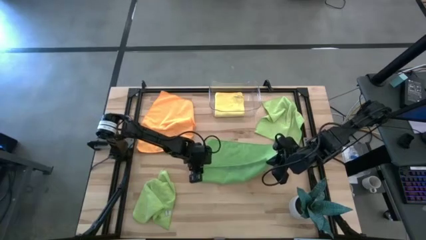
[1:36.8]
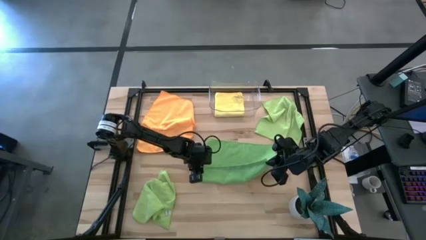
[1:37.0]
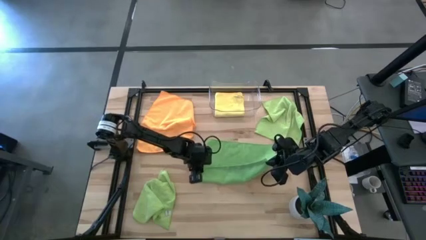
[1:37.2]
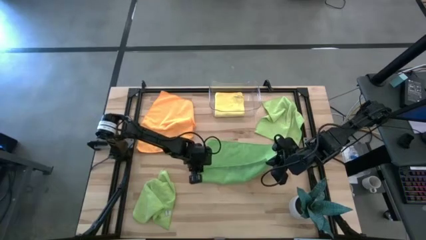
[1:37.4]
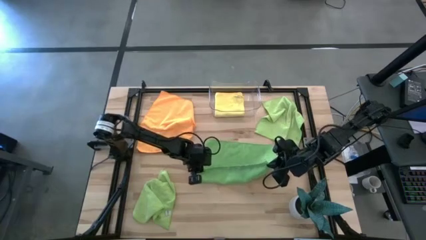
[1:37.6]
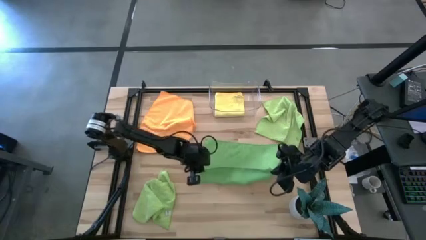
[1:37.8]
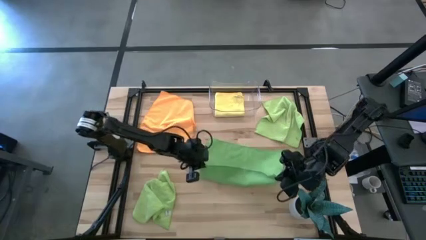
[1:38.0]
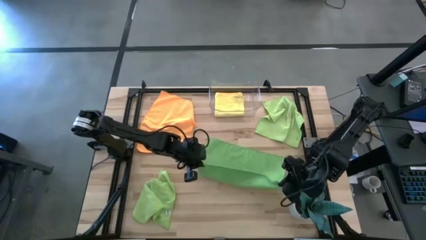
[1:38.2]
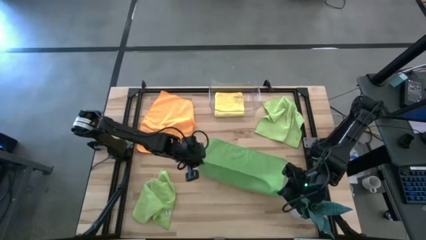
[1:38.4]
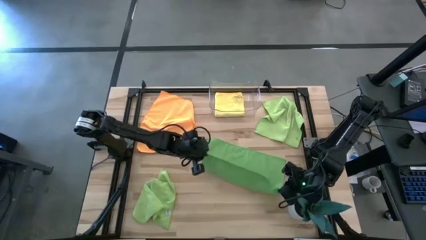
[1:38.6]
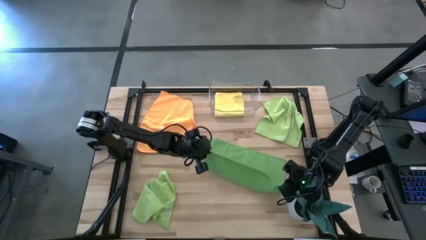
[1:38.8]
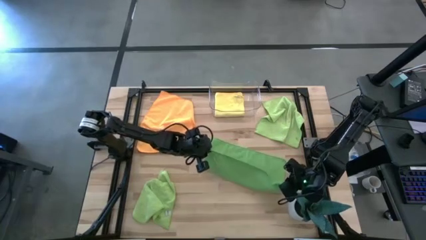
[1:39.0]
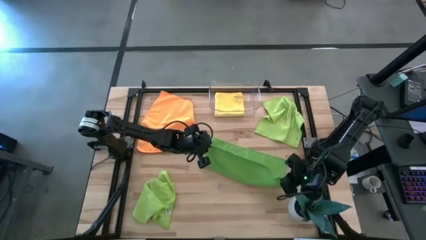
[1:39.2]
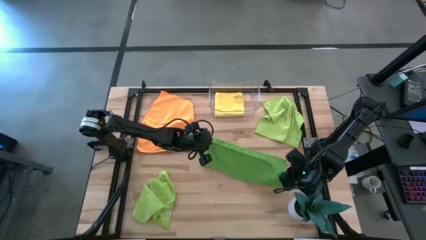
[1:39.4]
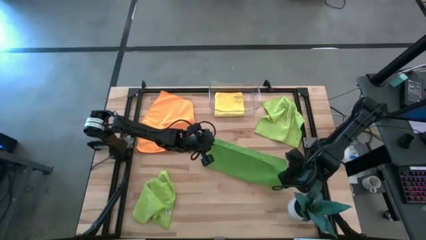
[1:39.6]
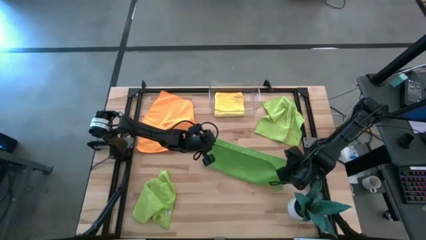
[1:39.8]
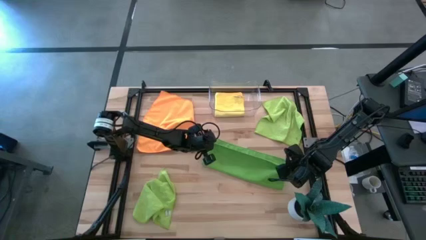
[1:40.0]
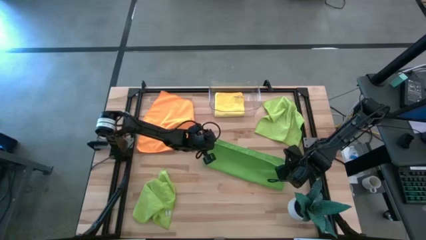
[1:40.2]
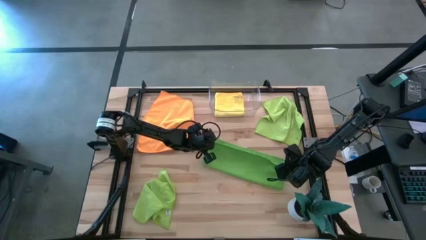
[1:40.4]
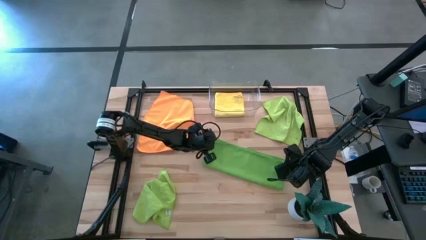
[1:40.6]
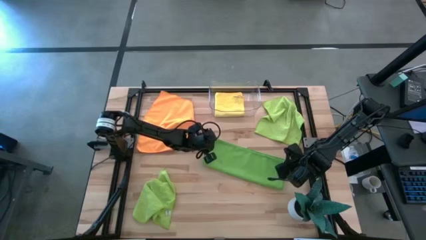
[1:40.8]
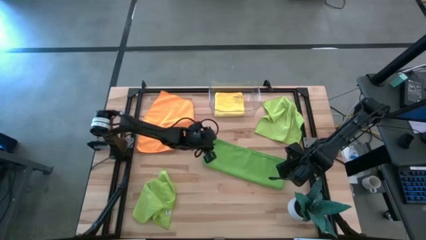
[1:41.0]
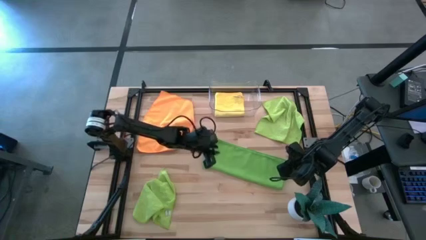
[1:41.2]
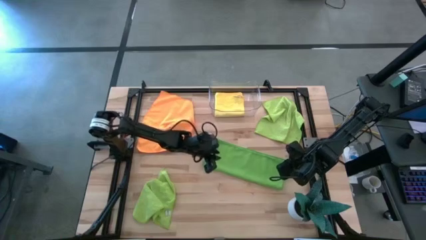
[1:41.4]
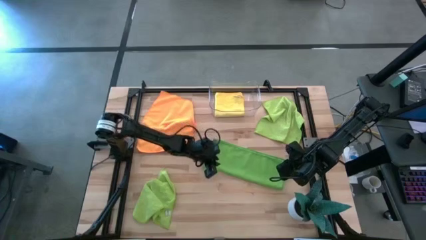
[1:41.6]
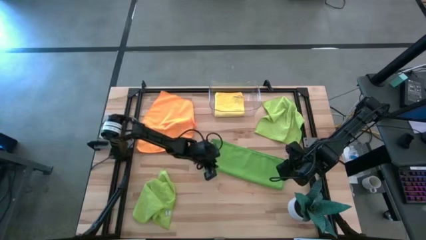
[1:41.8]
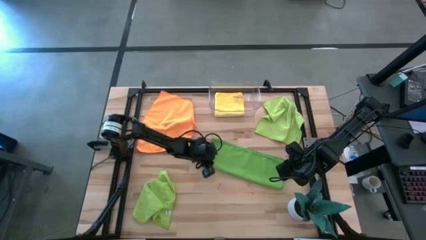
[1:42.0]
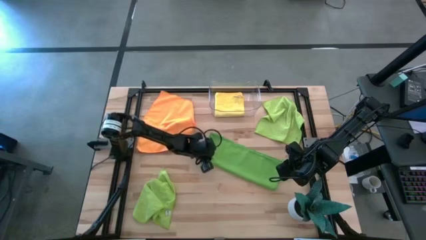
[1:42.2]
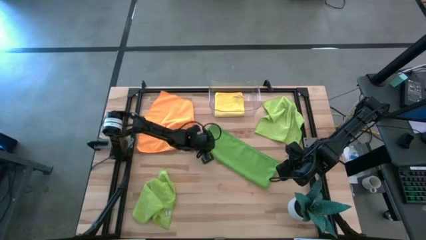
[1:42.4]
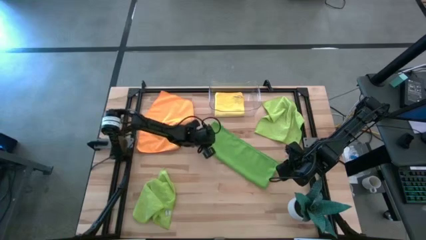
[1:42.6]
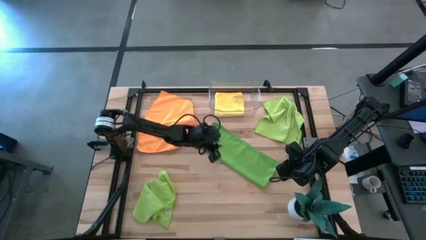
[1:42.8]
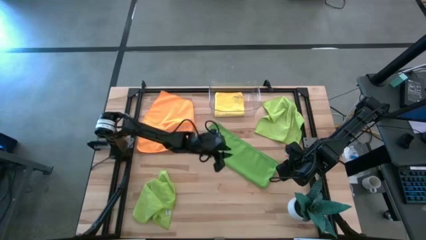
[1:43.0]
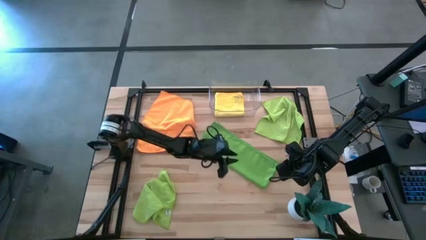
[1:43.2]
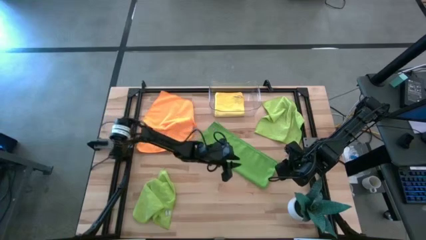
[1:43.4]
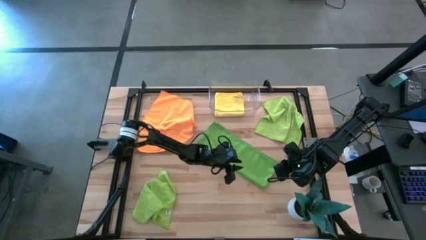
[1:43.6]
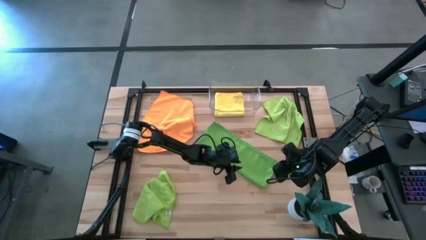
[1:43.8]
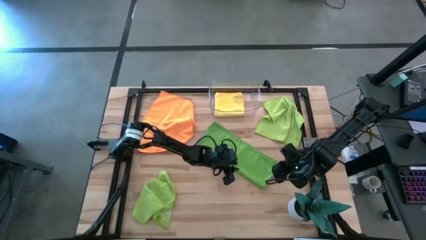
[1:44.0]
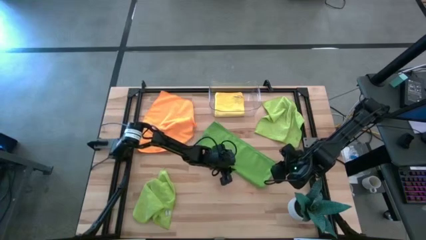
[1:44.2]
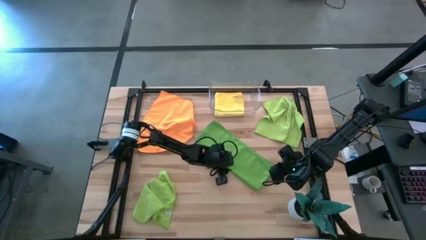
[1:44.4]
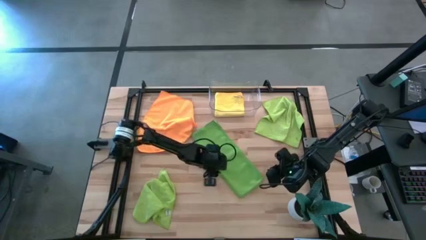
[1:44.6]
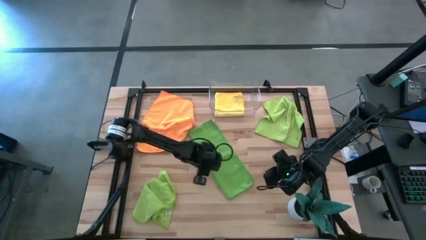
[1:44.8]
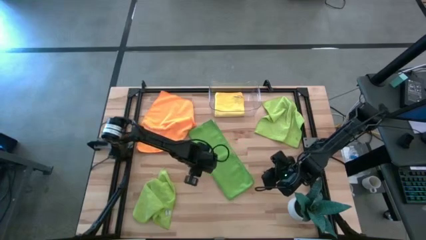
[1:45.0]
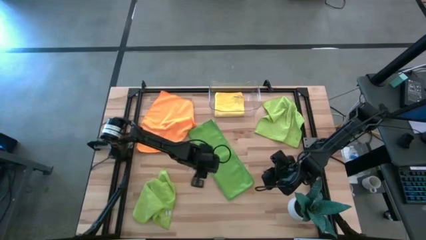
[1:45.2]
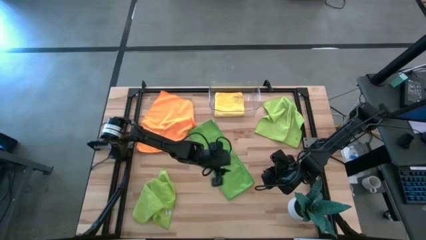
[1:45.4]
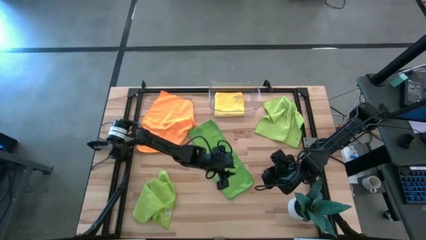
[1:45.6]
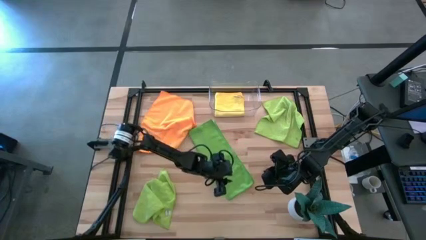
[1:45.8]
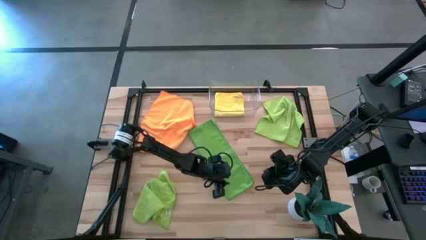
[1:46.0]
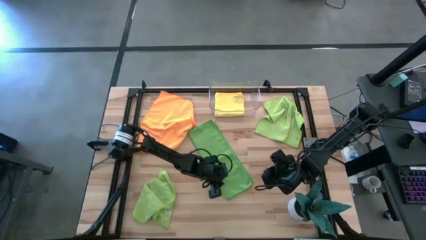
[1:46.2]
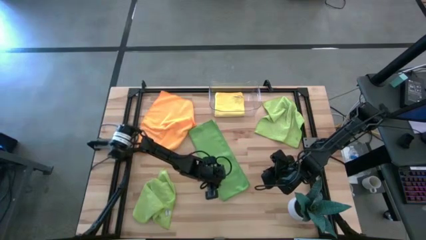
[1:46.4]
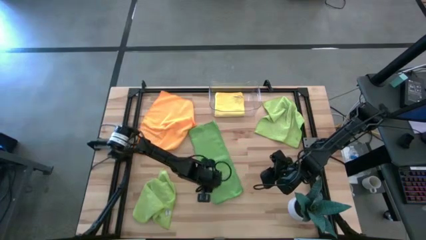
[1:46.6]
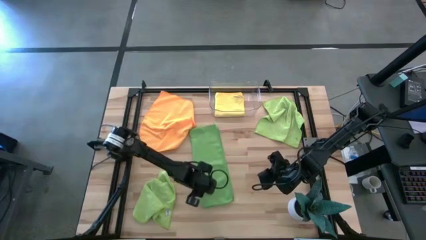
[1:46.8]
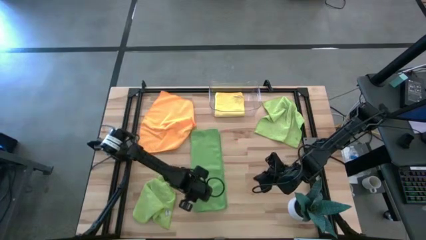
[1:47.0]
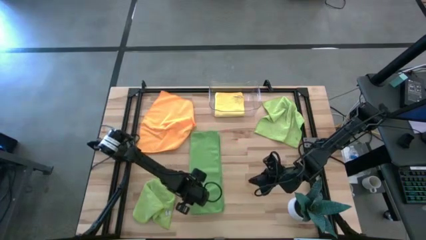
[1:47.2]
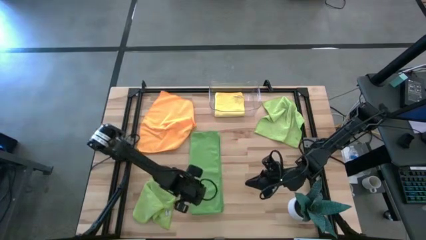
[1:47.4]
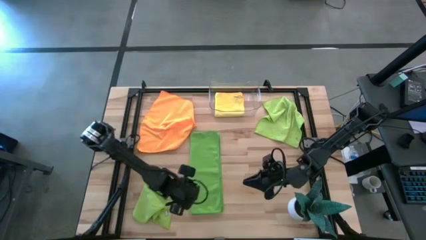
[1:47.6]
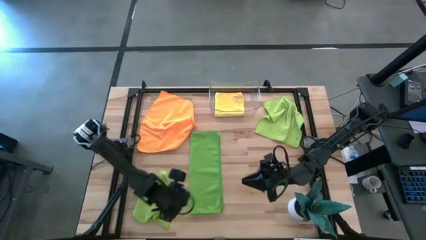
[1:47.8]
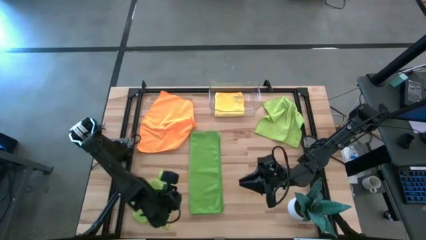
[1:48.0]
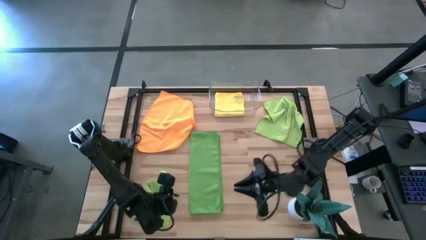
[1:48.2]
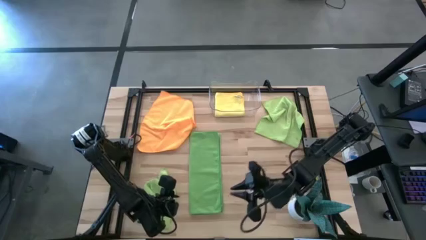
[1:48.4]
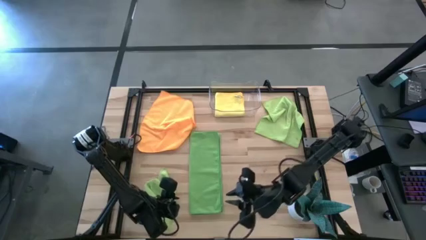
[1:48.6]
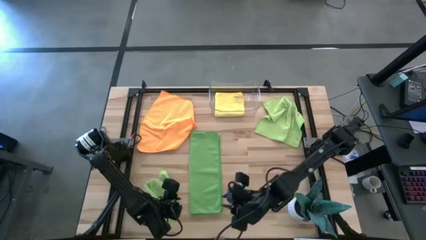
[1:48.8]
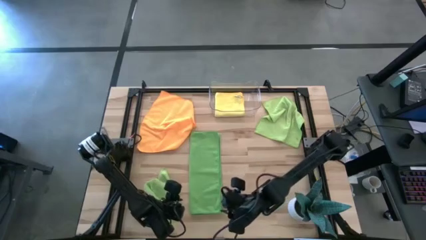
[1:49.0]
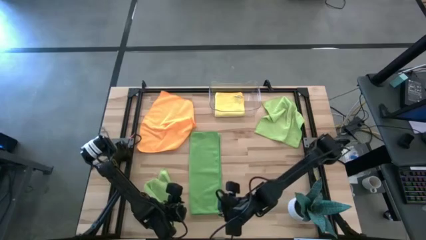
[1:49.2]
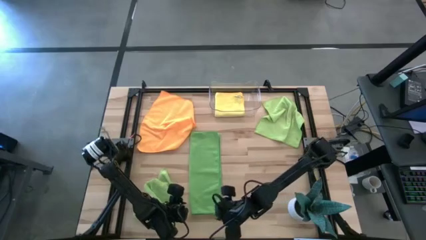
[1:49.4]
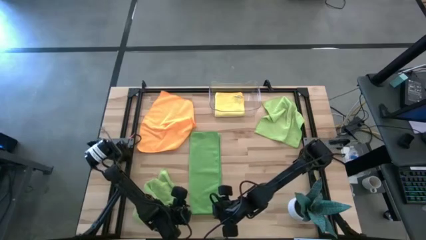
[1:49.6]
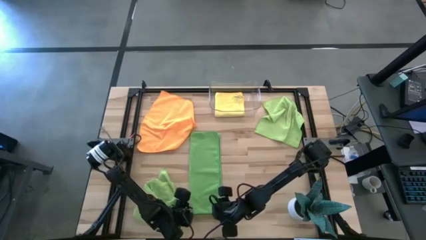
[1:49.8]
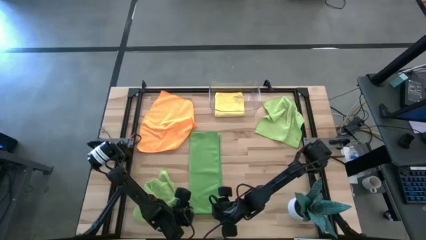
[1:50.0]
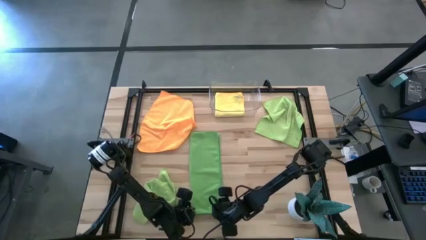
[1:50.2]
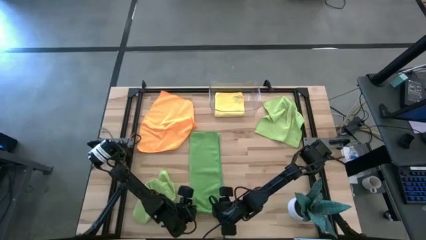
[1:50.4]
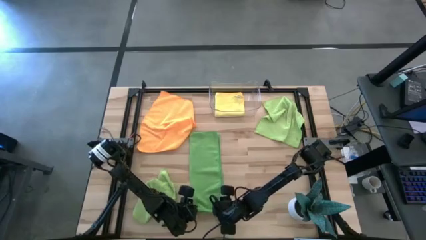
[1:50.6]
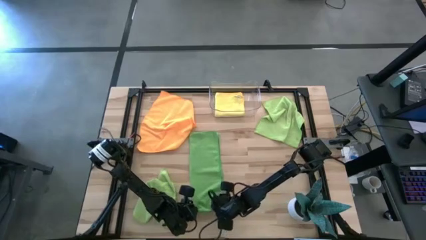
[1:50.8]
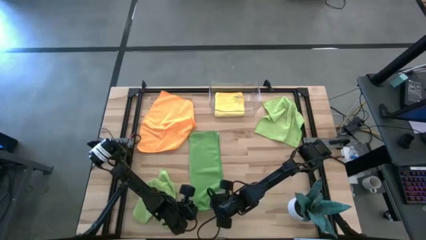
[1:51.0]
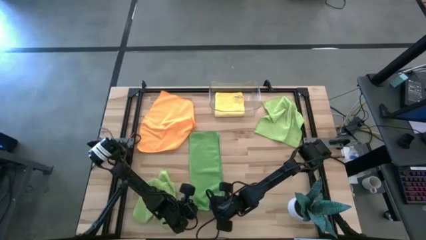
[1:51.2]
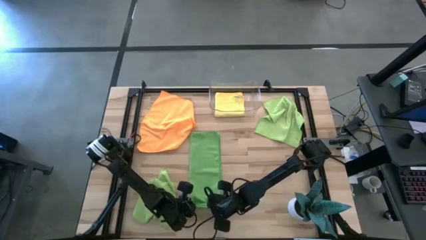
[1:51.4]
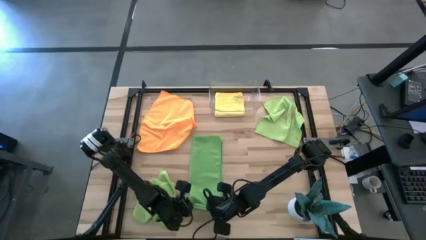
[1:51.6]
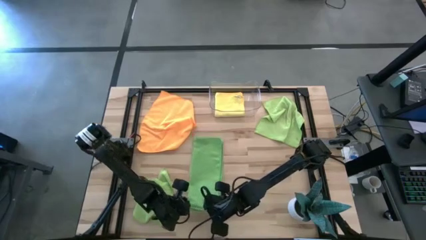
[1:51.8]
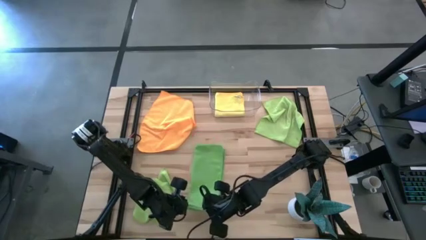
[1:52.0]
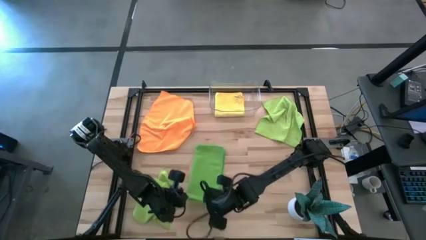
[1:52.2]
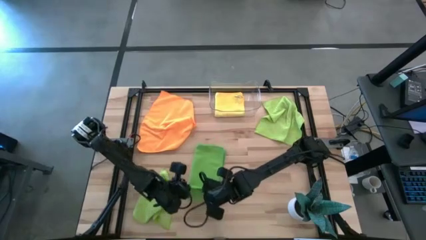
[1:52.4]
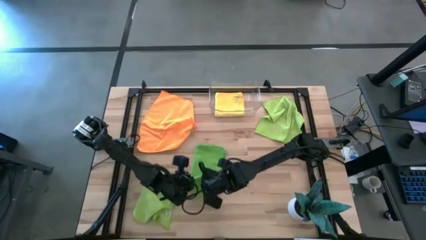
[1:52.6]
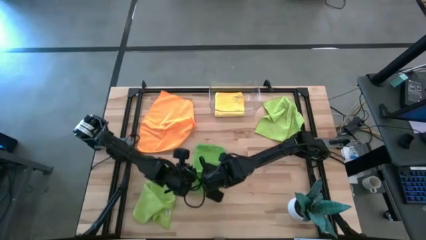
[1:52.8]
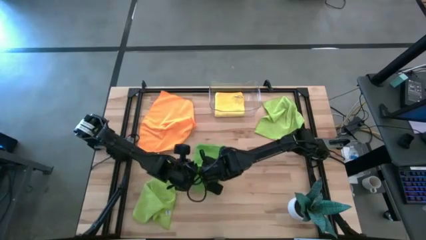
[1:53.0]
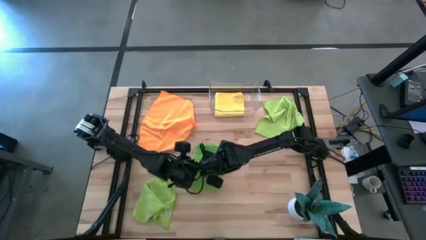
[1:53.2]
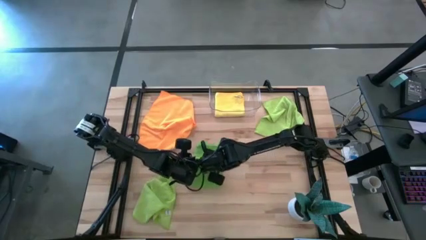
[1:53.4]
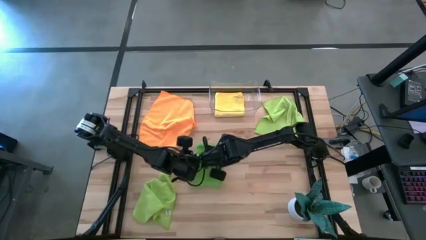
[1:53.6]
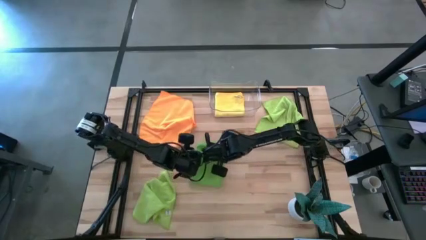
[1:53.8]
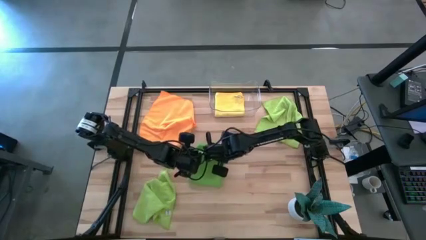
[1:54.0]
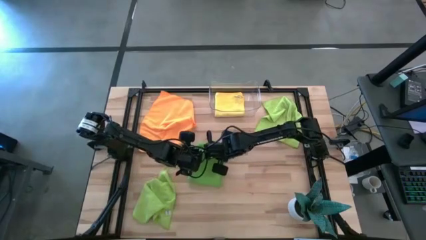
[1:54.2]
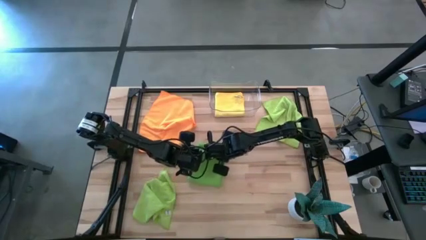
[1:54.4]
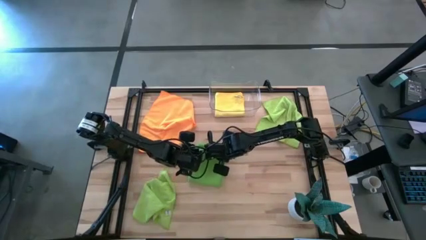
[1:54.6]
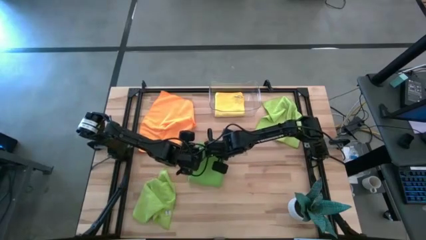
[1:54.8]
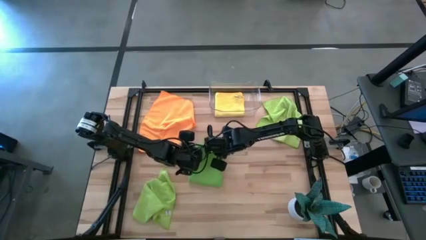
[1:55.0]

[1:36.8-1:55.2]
Task: Fold microfiber towels
Fold the green microfiber cloth
